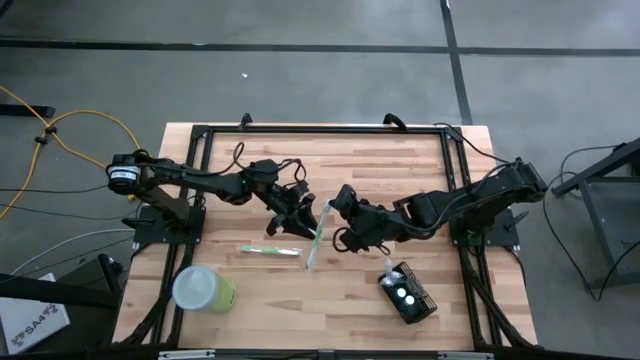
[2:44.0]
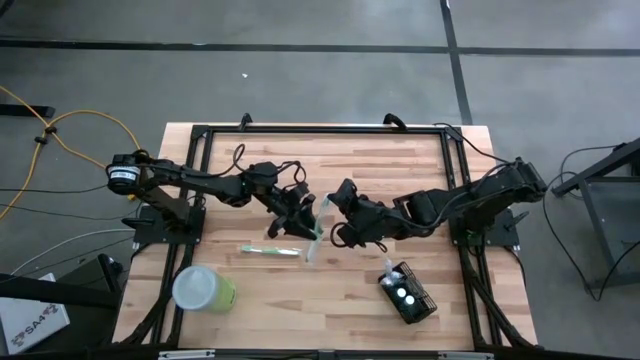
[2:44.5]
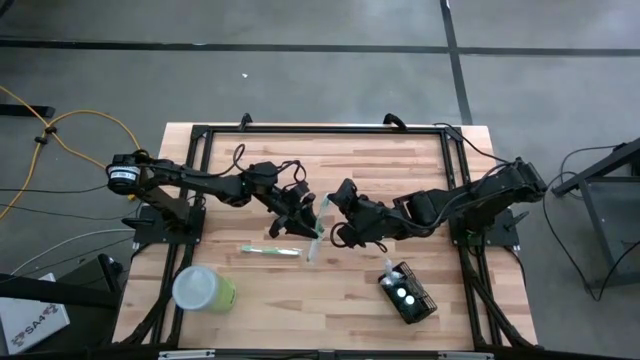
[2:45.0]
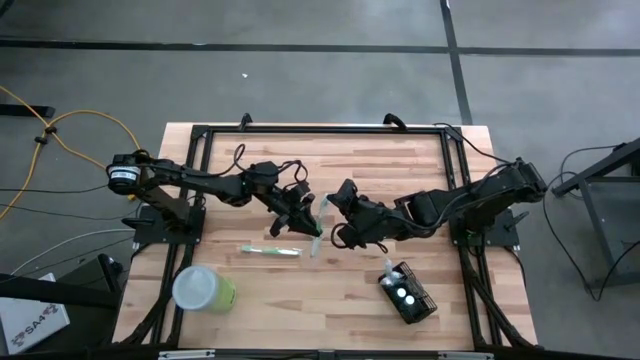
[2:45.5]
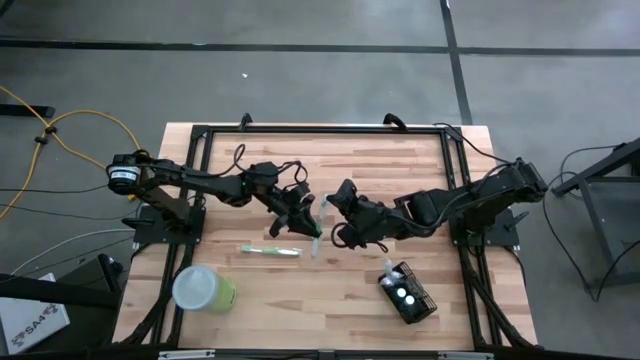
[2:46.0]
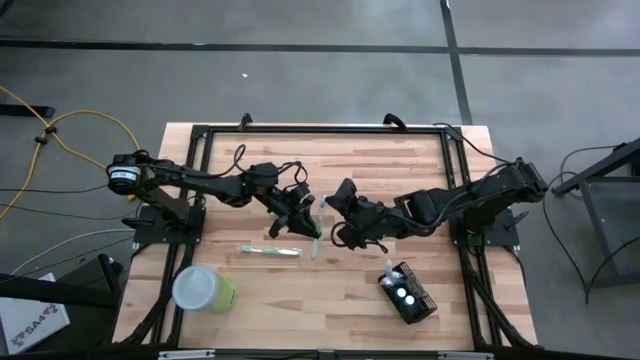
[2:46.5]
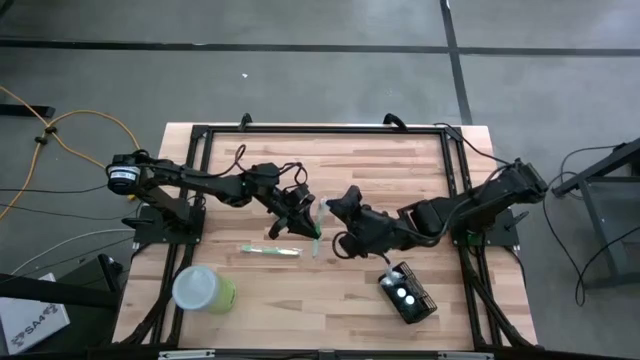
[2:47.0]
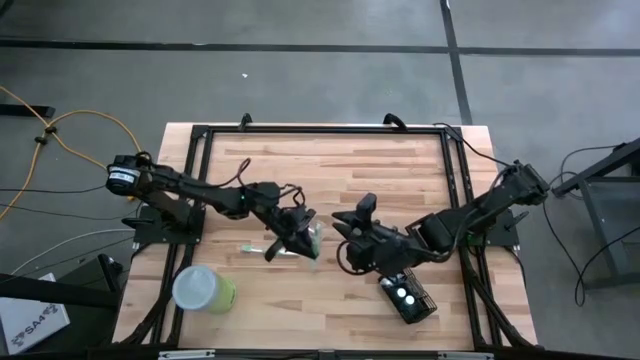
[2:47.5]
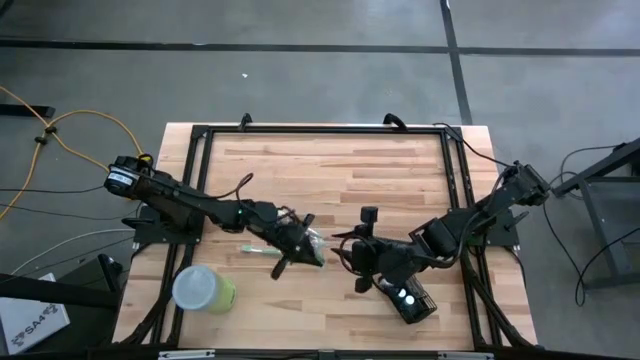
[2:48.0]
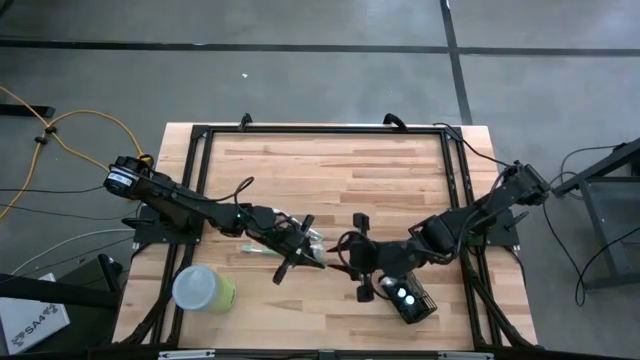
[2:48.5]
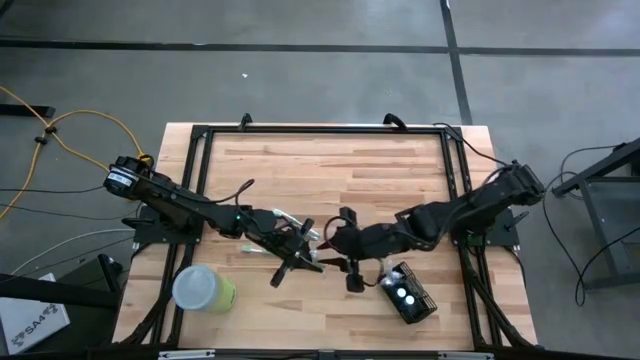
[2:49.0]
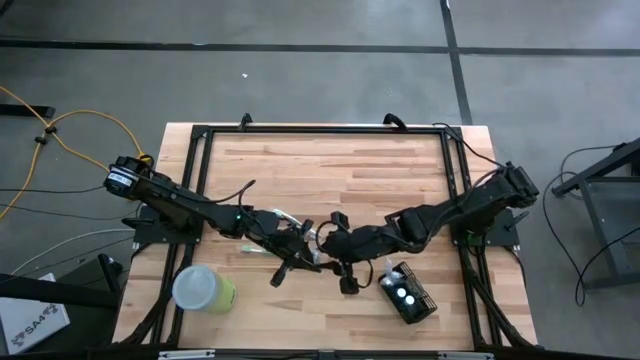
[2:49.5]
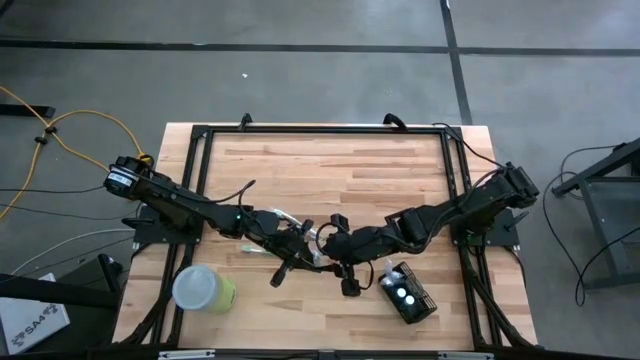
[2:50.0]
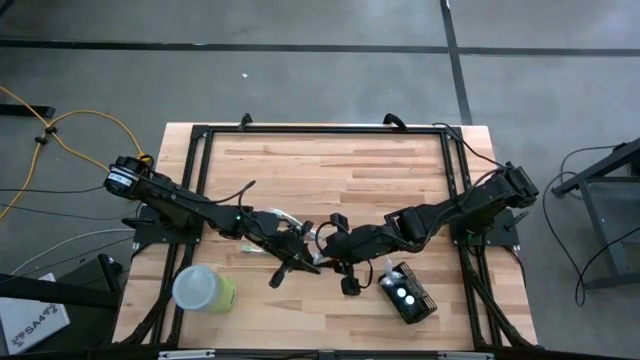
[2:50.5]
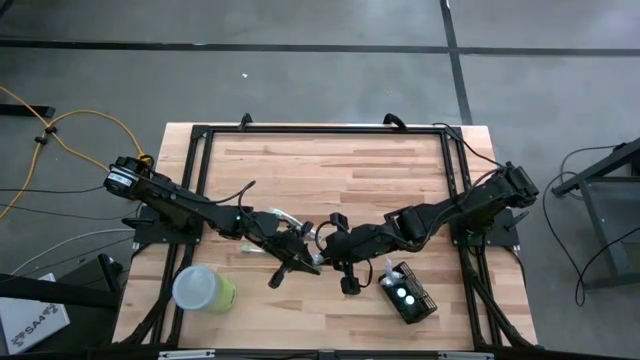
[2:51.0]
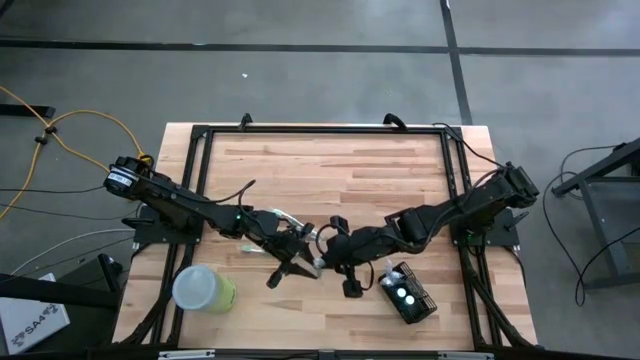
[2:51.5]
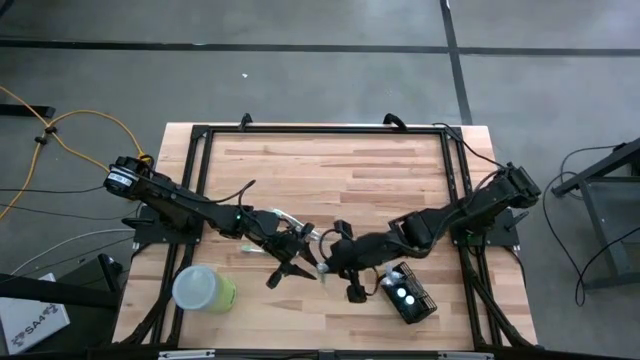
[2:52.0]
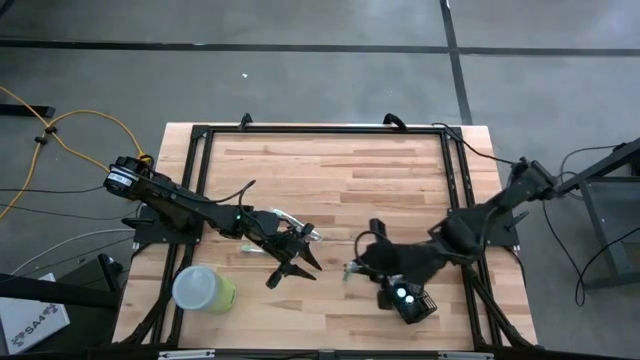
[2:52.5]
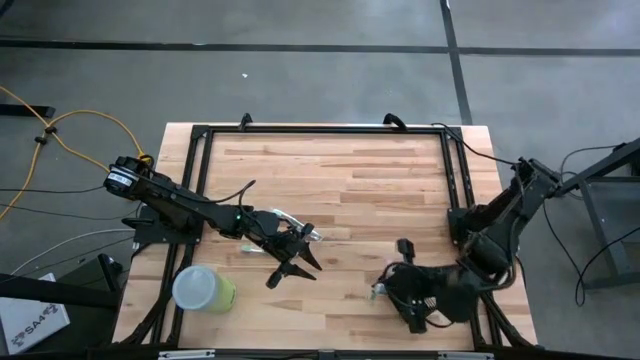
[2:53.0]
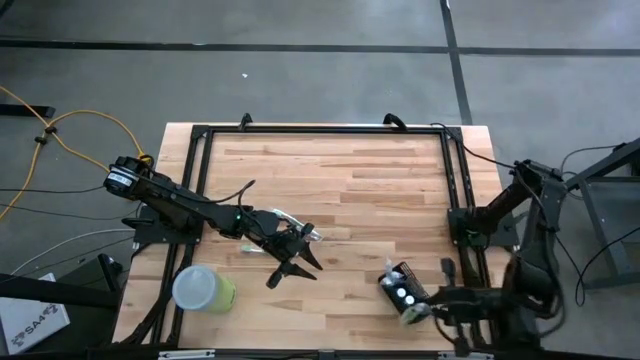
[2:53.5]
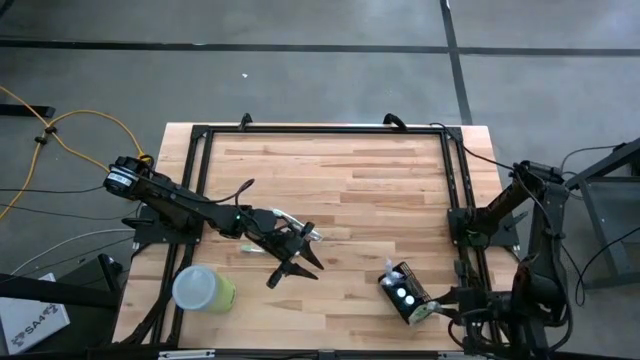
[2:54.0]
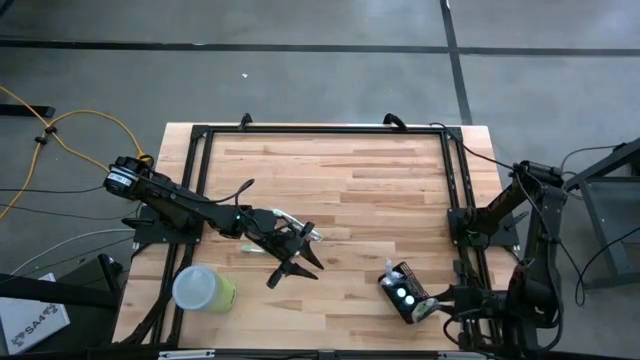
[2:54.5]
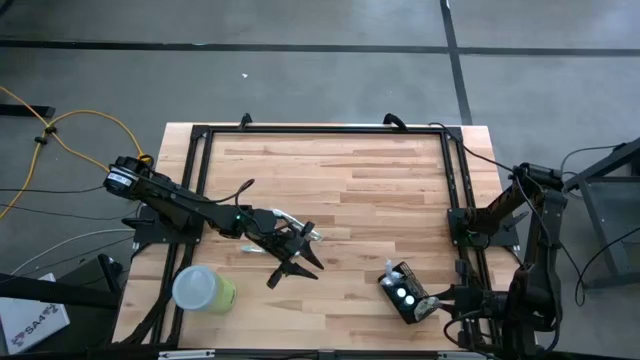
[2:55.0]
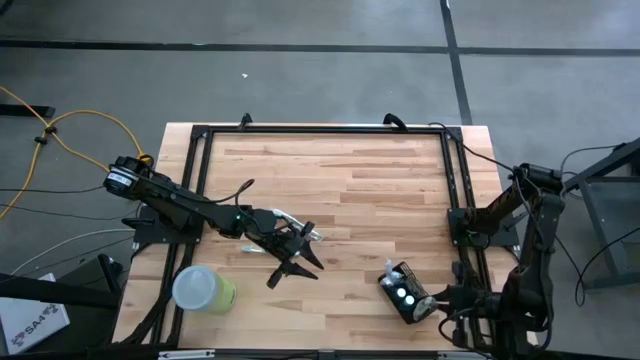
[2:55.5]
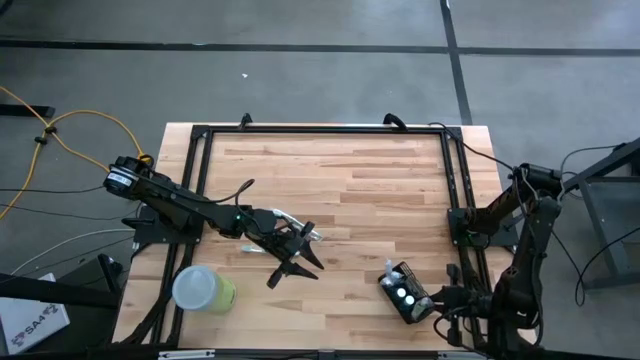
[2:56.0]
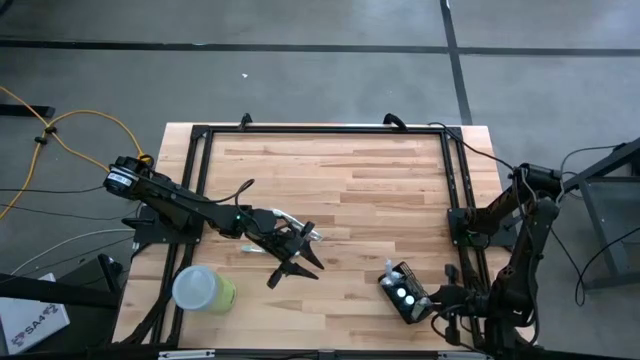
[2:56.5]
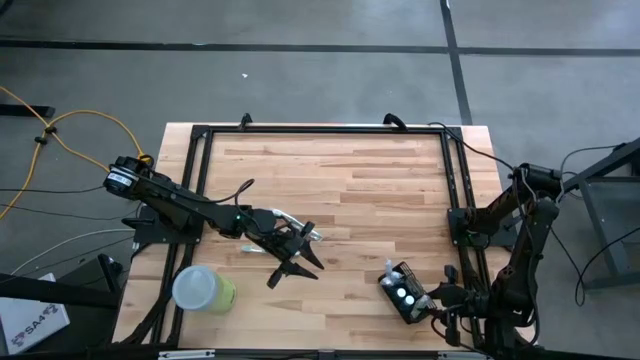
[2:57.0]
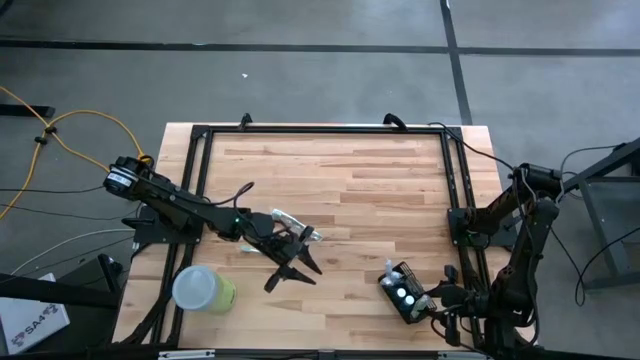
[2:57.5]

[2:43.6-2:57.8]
Task: Pick & Place toothbrushing station
Put the top green toothbrush into the bottom section of the black wire organizer

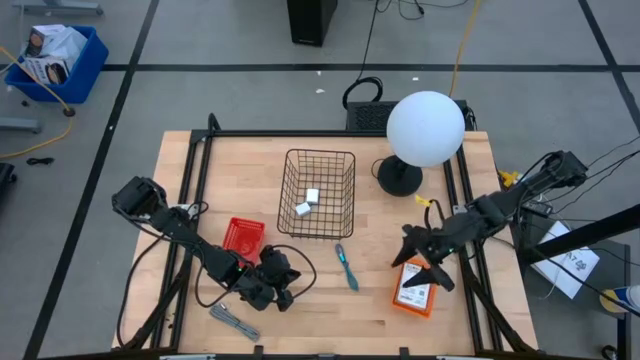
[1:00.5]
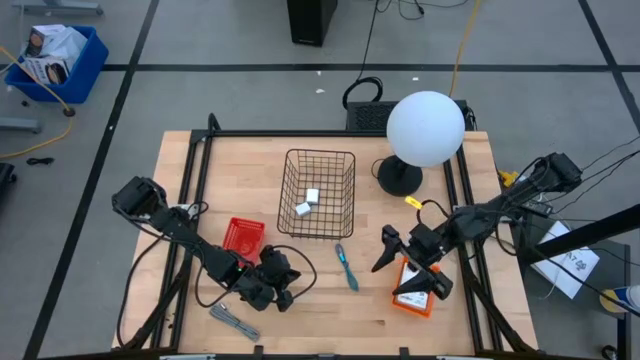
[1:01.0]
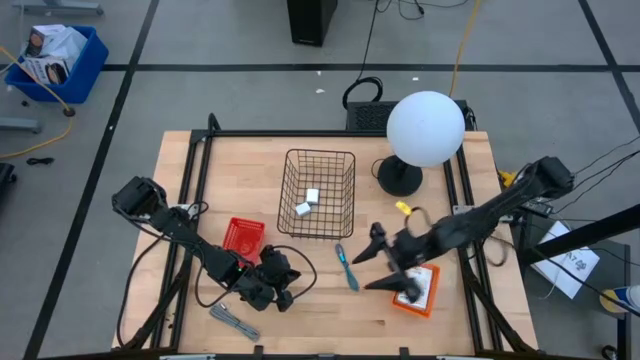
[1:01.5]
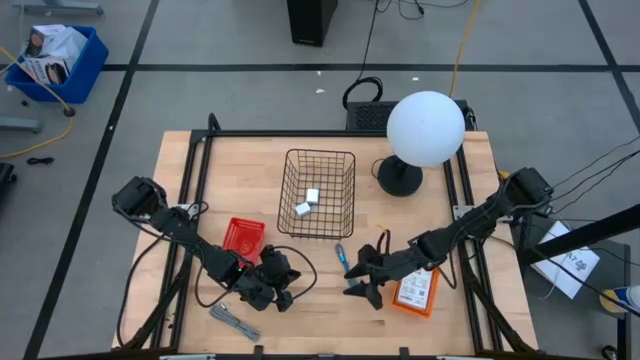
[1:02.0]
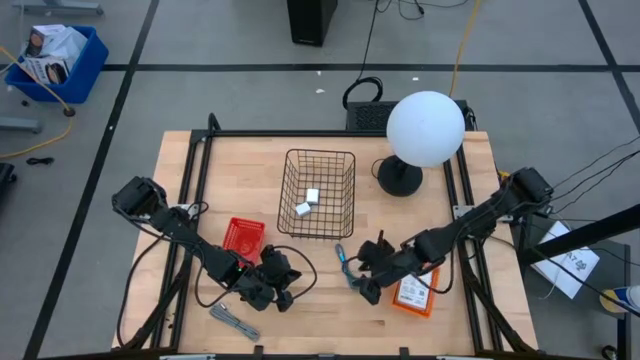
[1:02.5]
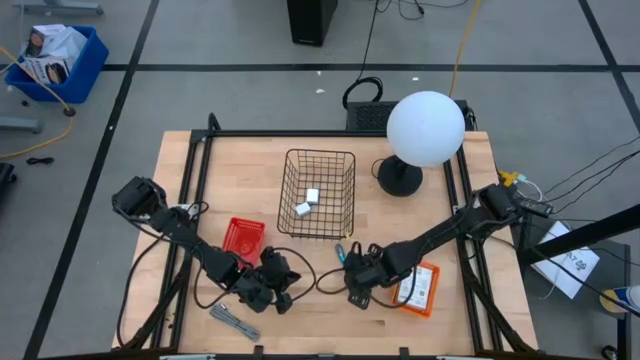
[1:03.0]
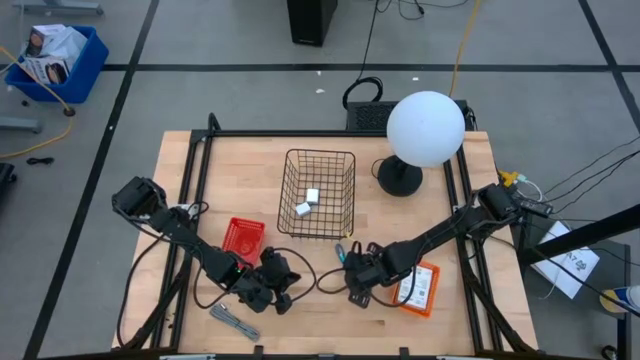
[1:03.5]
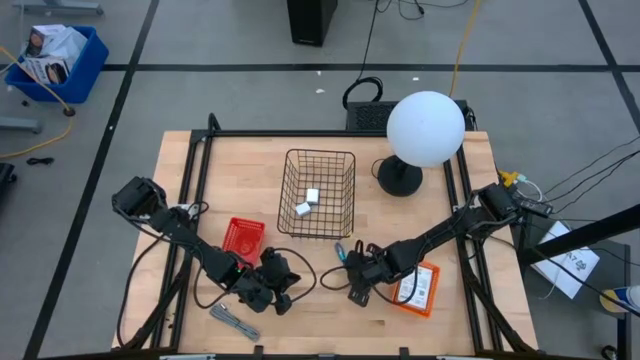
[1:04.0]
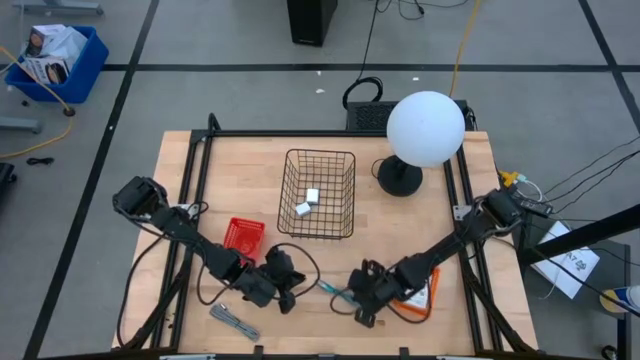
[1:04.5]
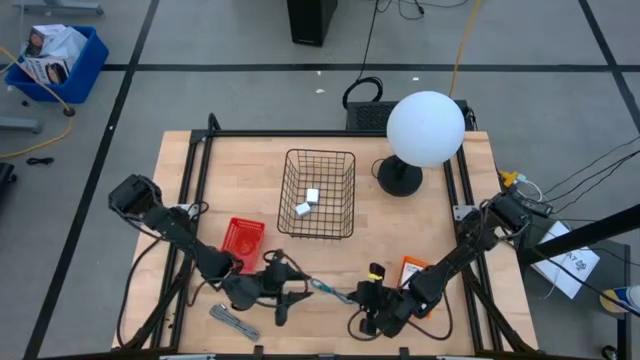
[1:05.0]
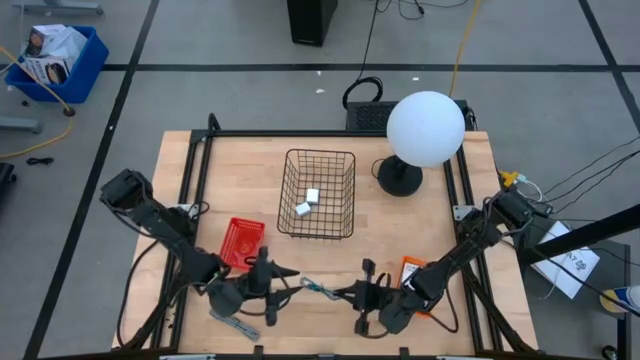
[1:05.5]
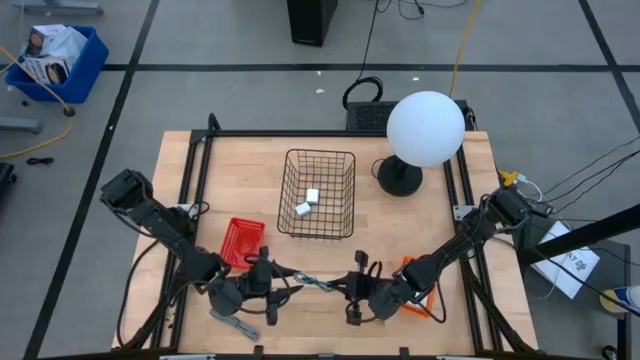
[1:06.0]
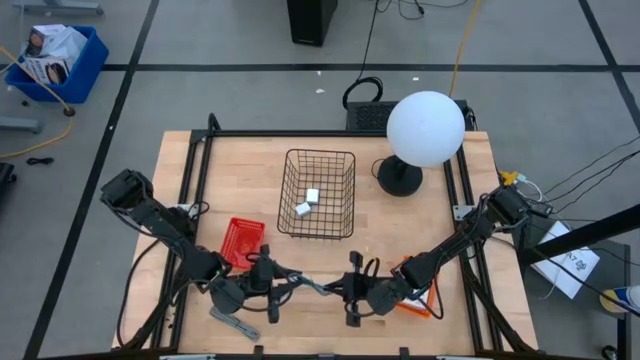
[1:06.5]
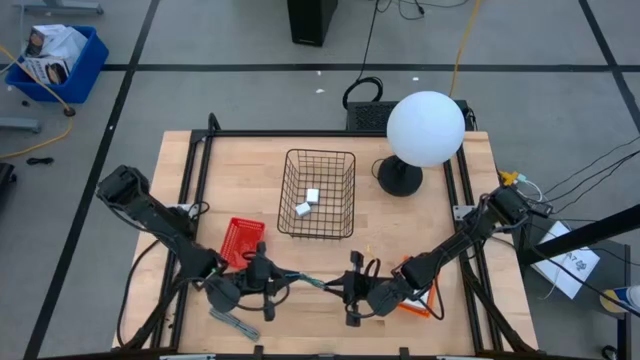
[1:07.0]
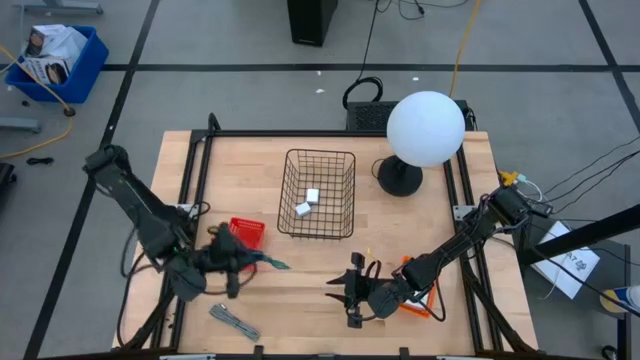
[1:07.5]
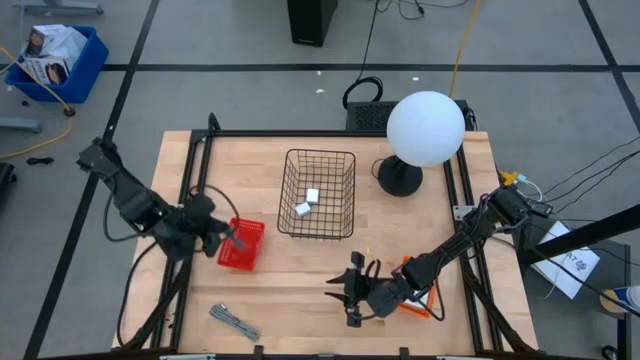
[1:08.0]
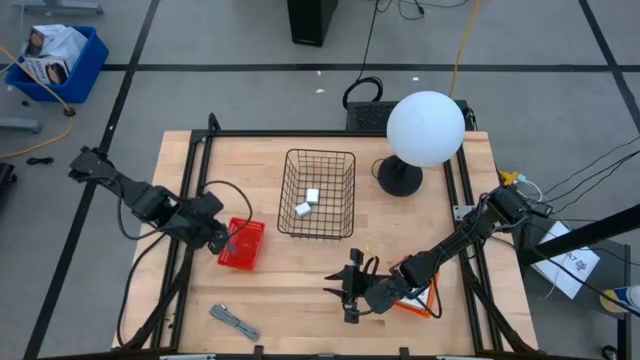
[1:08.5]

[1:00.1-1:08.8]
Task: Pick and place items into bin
Put the blue charger cable into the red basket
